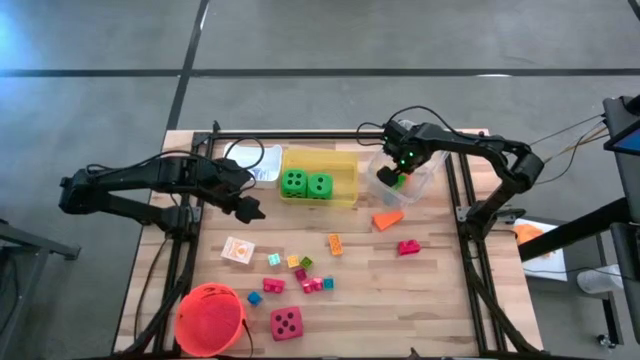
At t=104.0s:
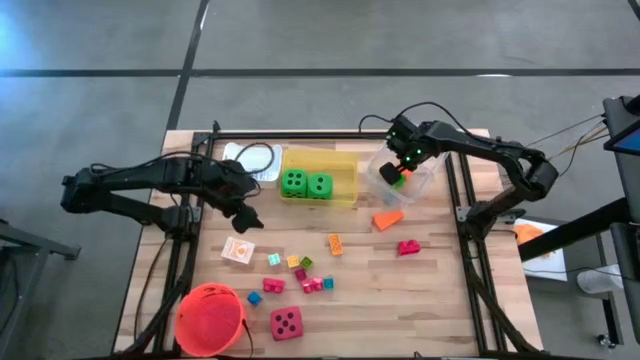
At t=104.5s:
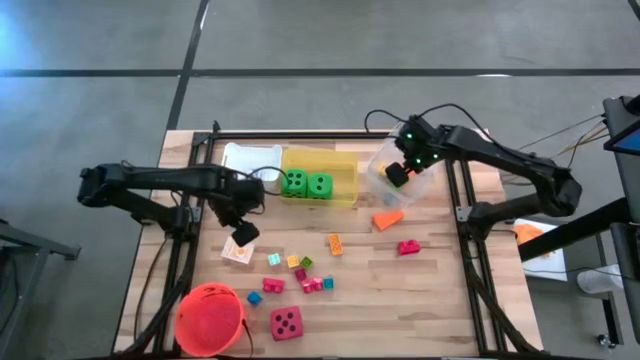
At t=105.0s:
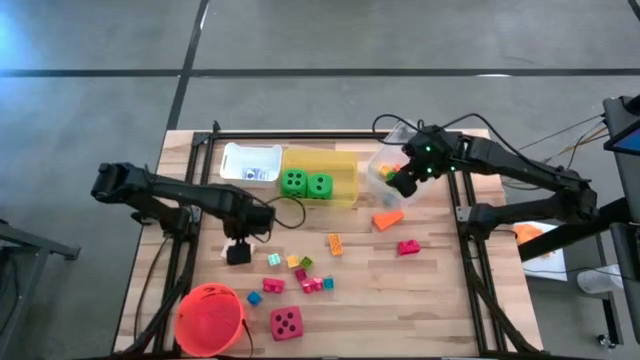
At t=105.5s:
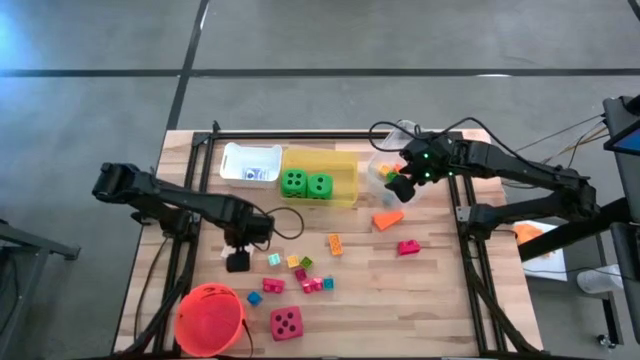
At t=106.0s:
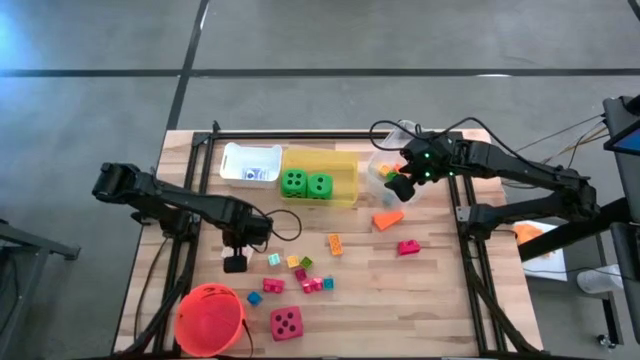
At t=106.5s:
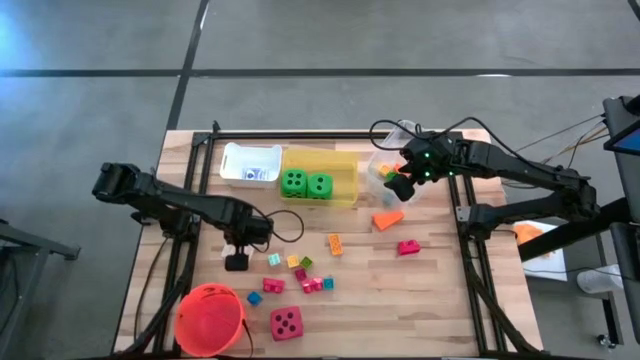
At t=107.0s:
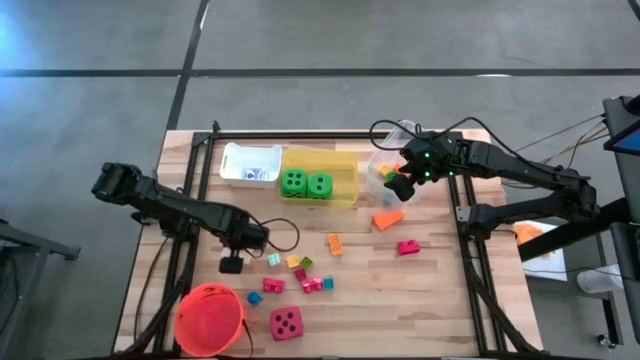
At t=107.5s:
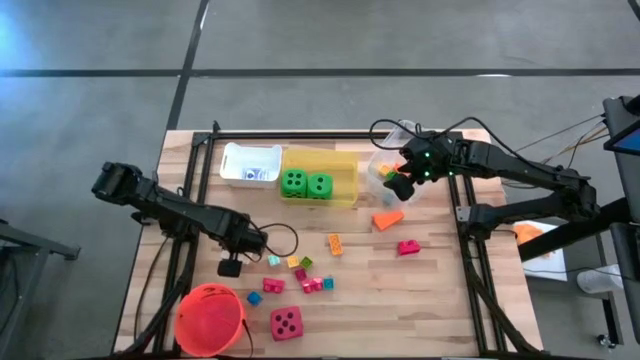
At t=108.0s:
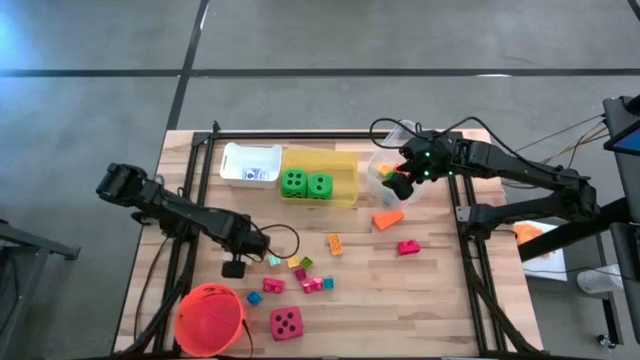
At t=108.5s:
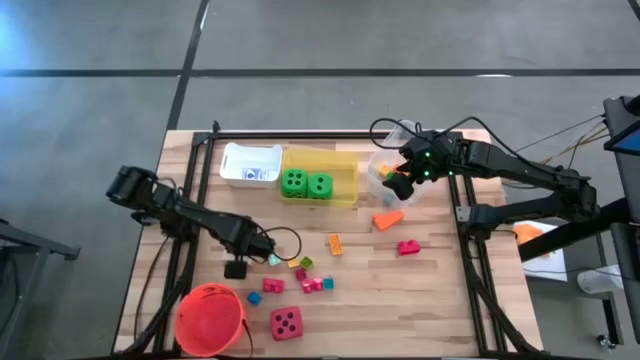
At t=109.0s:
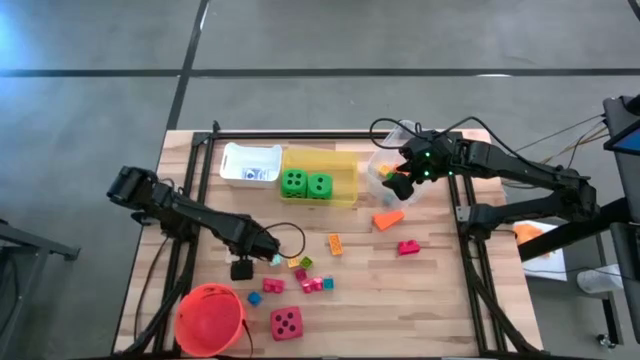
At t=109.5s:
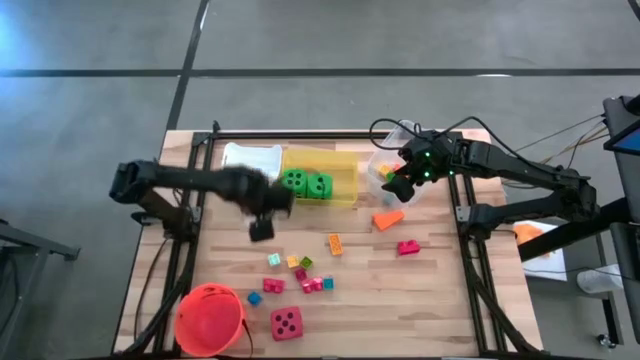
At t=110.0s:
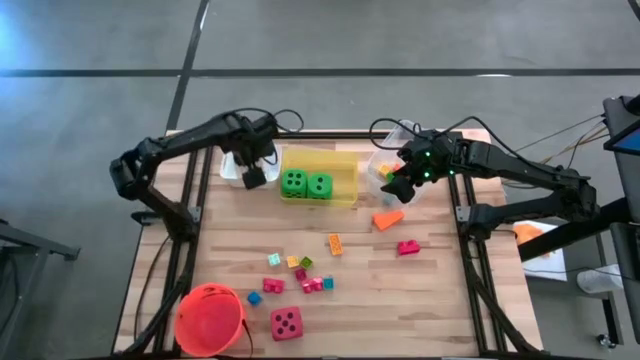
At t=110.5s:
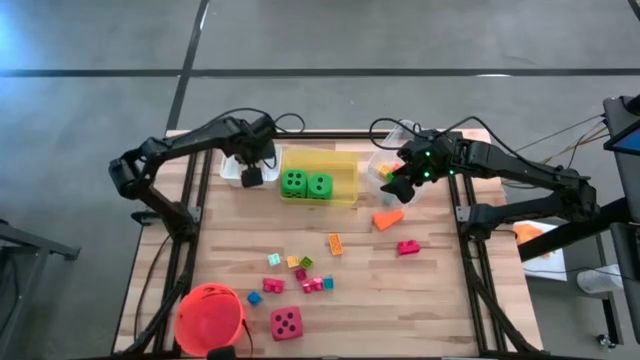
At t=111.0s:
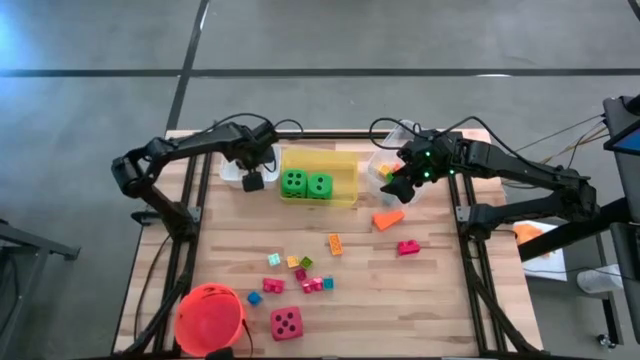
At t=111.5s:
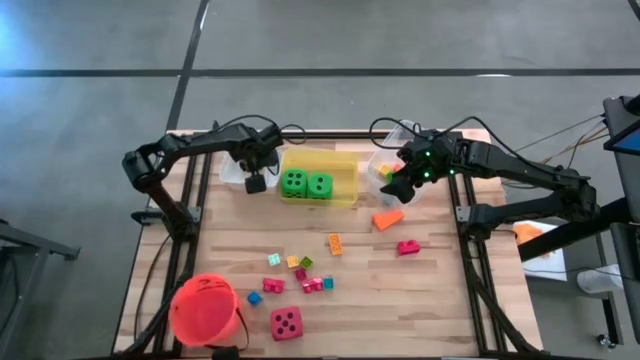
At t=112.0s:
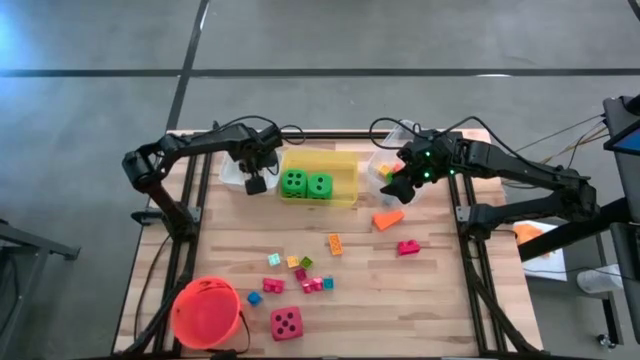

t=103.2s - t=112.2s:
Task: Pick & Place Toys
Put the yellow deck of cards into the white bin

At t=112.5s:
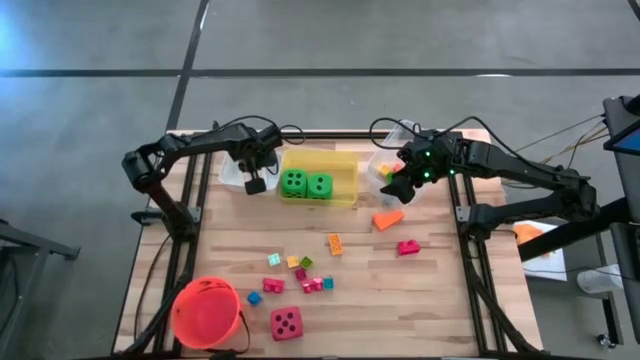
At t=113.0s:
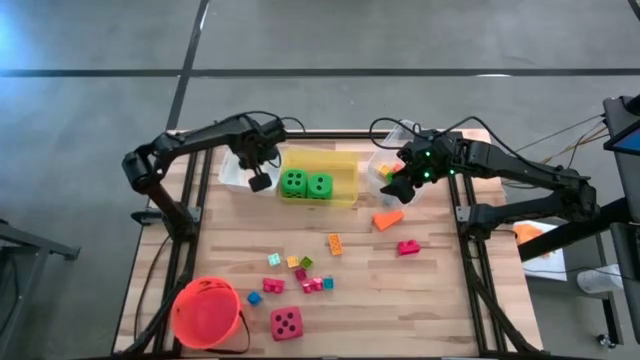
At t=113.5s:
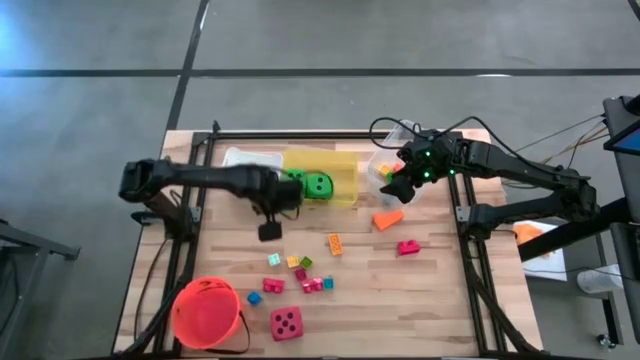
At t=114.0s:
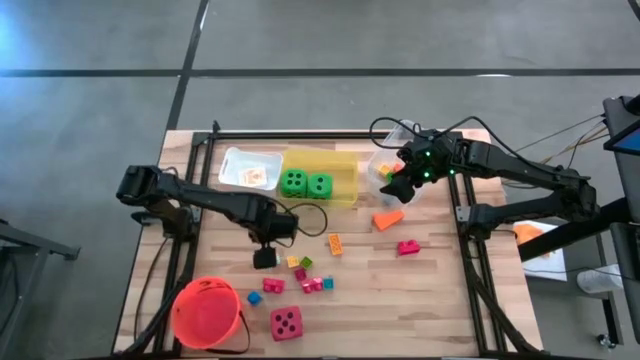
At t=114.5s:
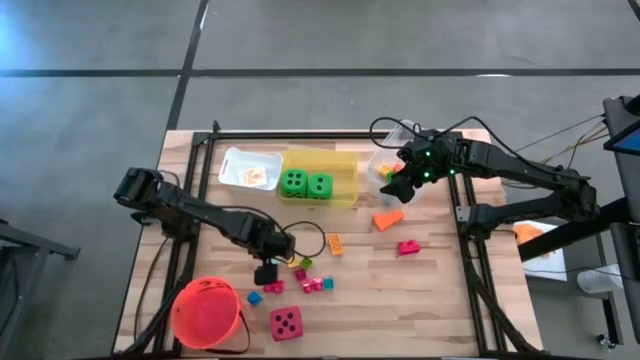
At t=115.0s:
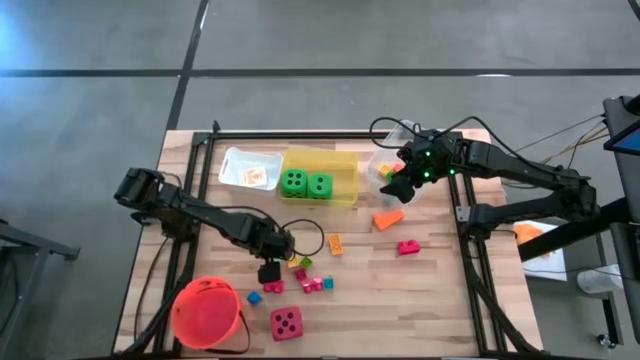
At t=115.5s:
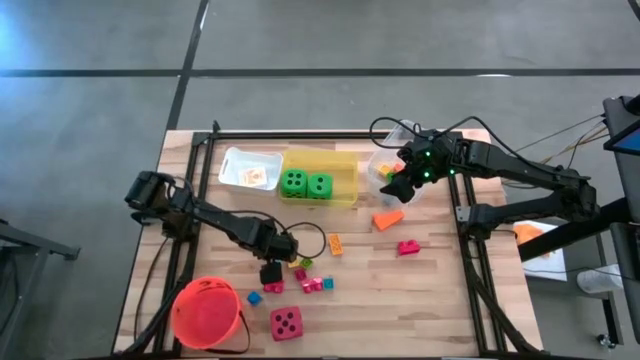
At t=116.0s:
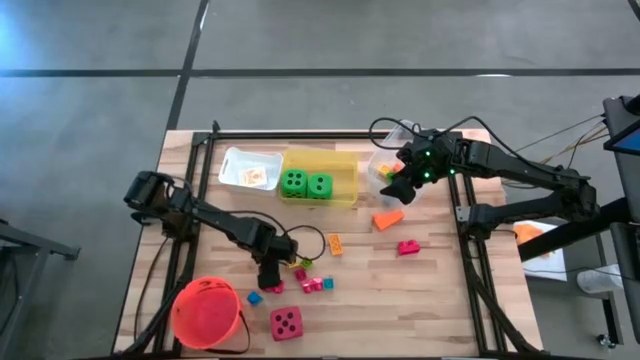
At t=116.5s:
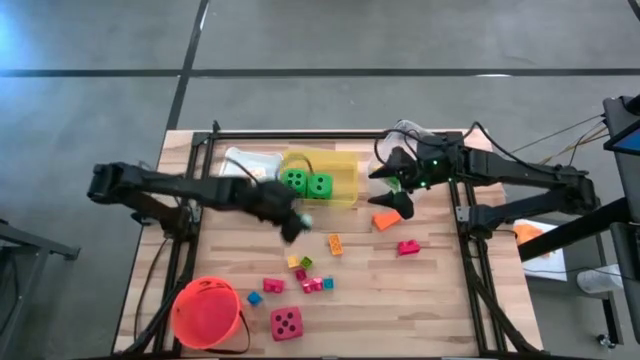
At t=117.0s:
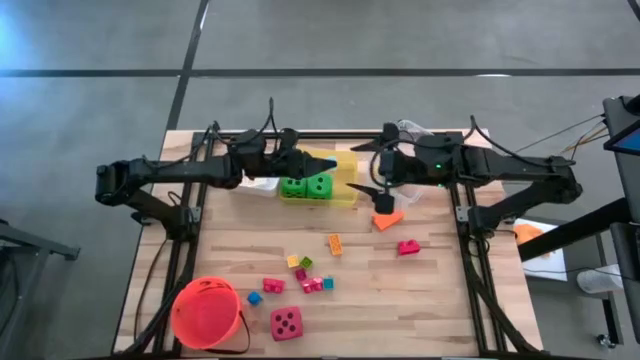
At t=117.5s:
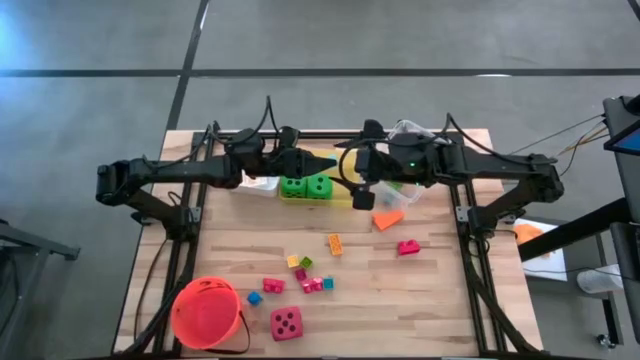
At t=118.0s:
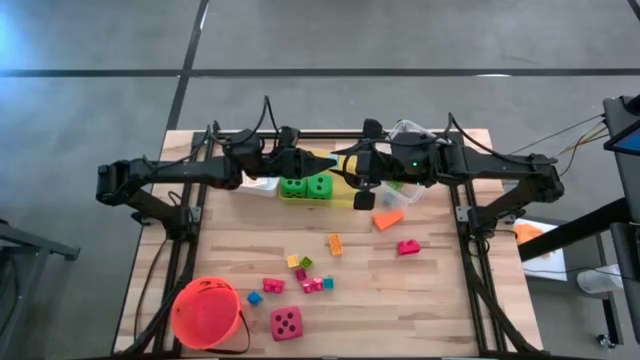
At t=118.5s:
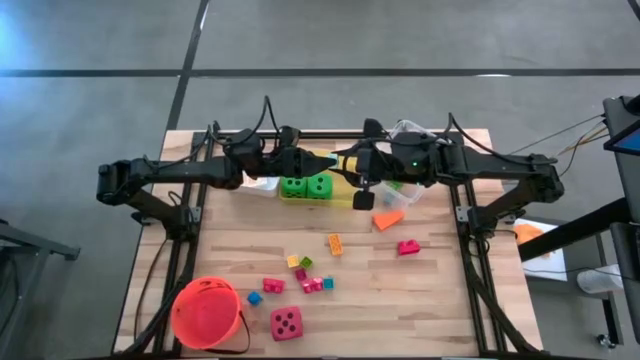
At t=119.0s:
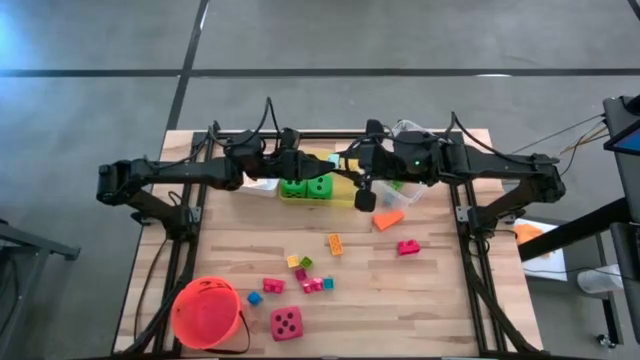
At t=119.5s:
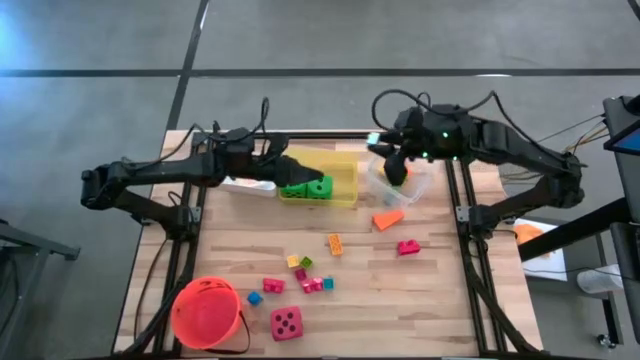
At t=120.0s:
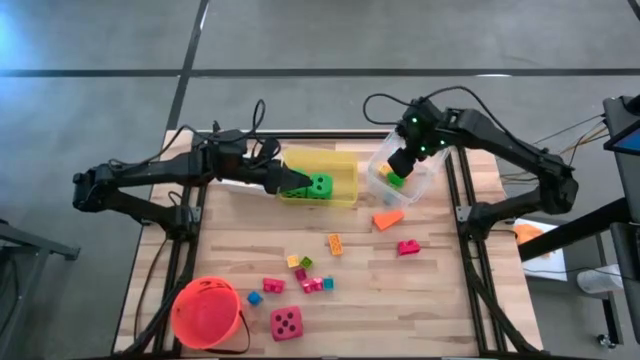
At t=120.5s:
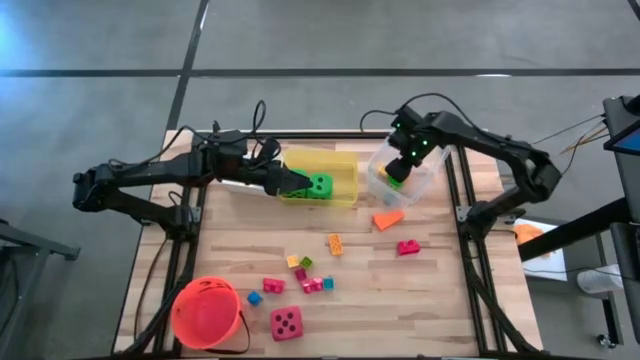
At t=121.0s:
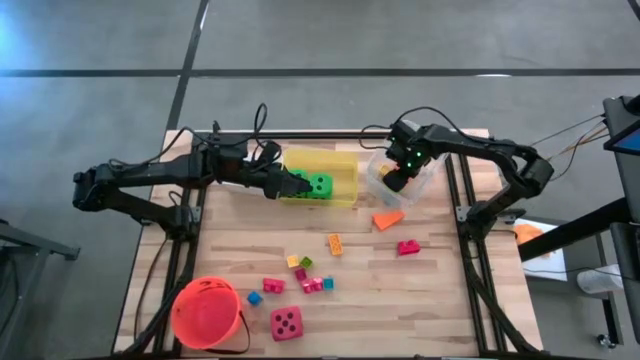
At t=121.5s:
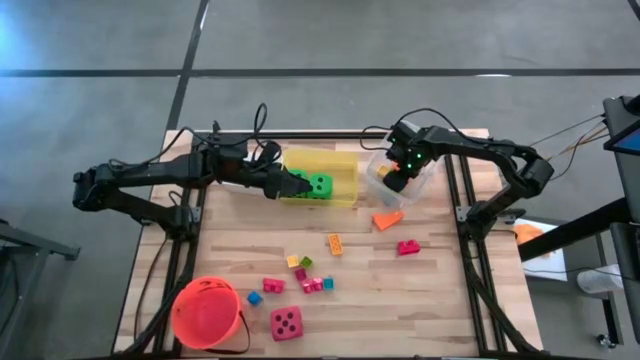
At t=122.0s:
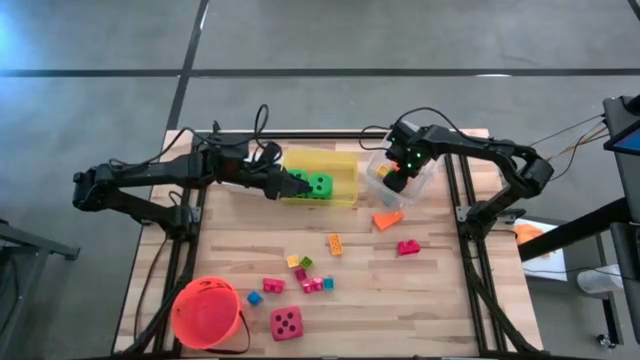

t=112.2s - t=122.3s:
Put the light blue game piece into the transparent bin

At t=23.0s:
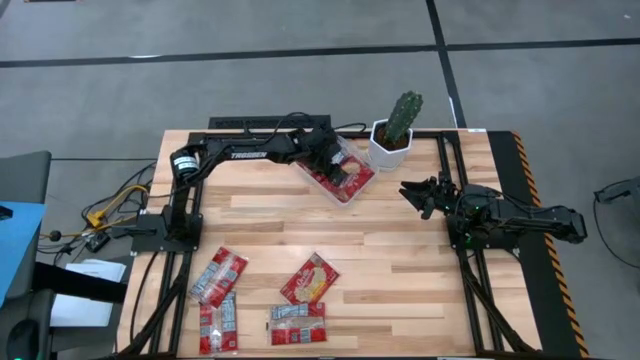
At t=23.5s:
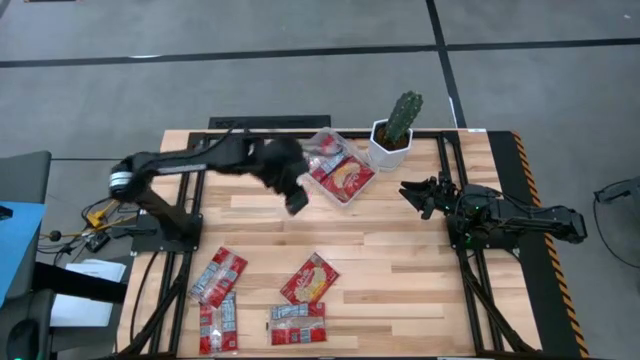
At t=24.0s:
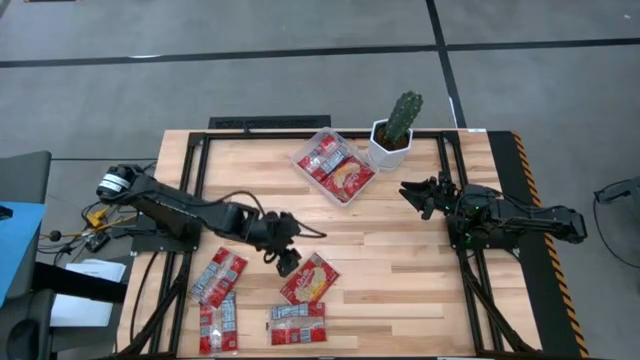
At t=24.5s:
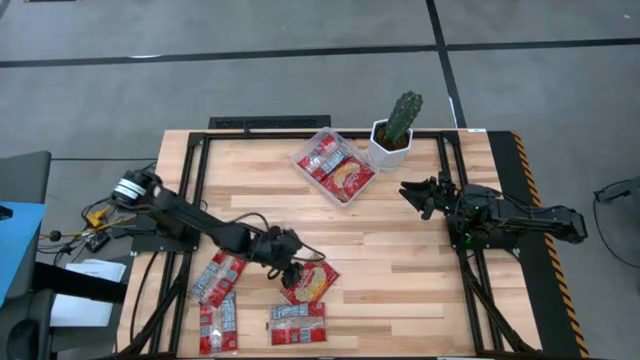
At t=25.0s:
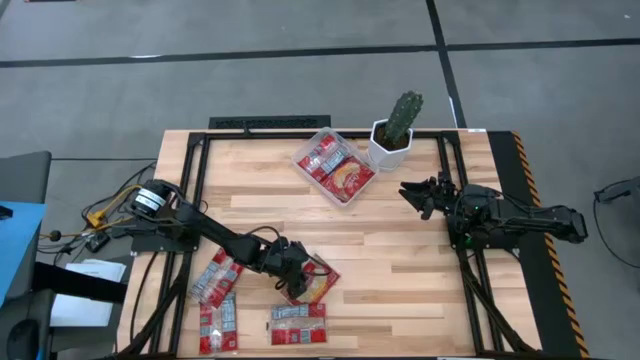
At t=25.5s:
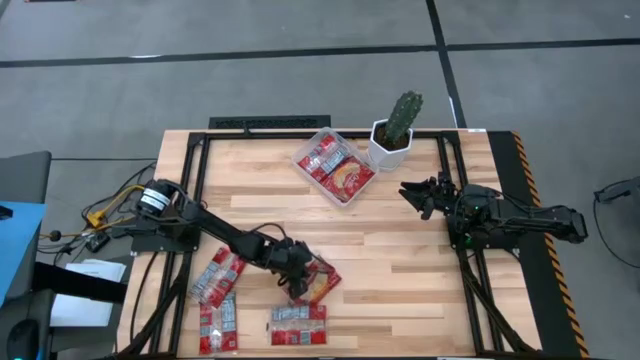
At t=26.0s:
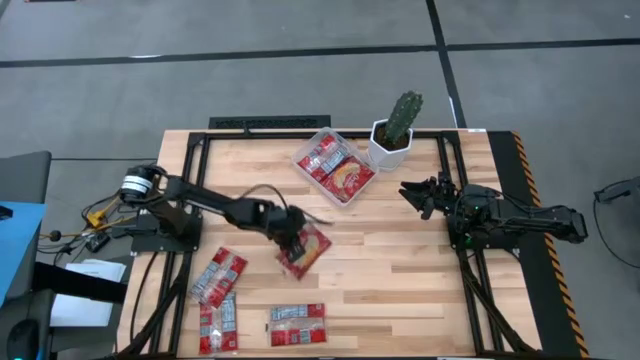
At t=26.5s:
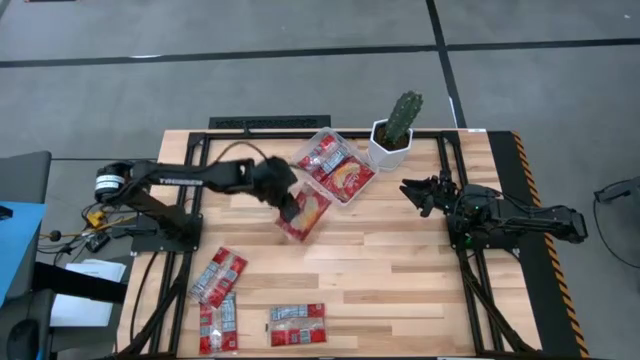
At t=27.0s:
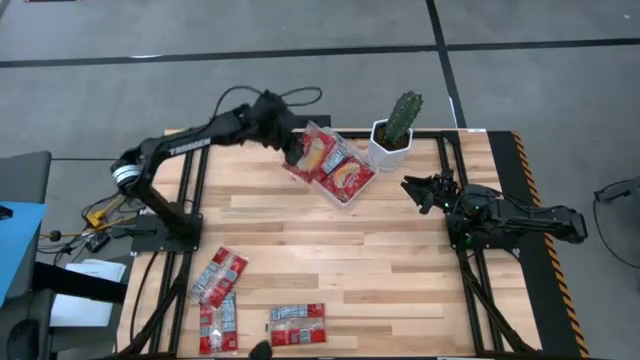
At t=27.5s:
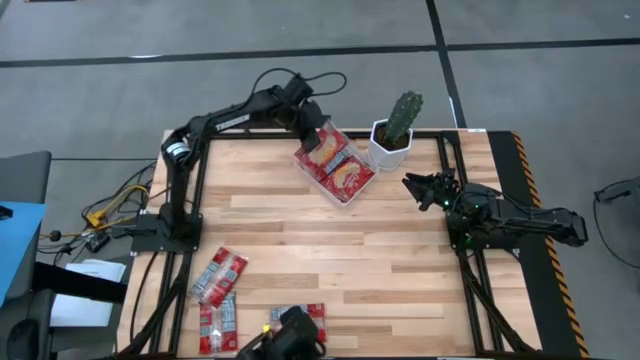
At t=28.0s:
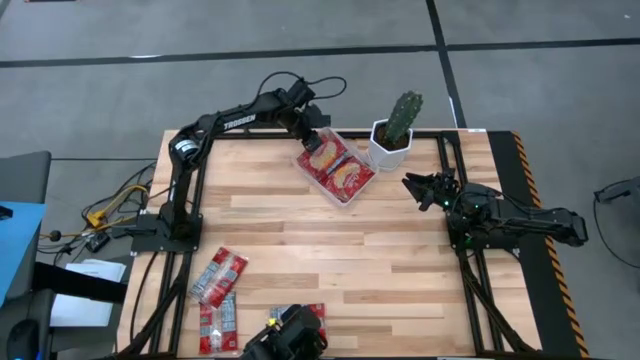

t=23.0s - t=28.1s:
Task: Sort popcorn bags into baskets
Put the red popcorn bag into the transparent bin
